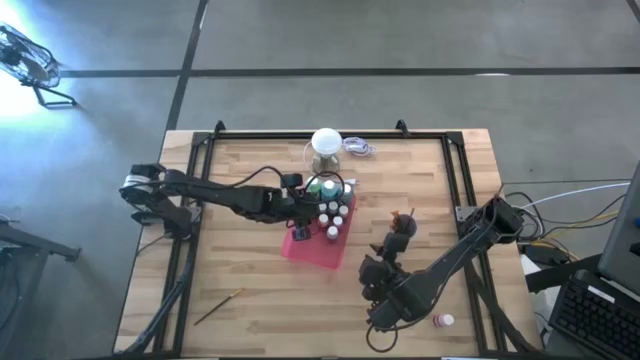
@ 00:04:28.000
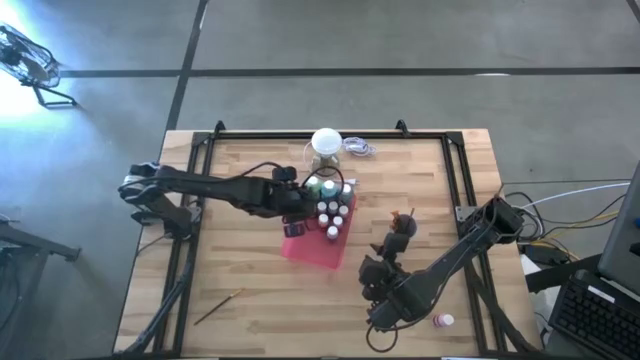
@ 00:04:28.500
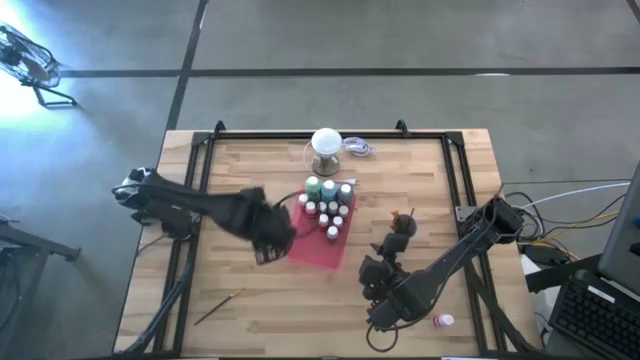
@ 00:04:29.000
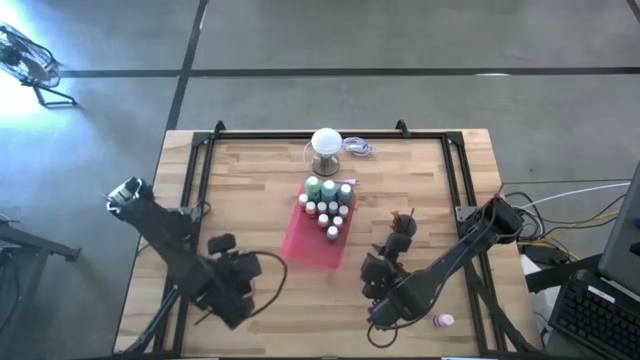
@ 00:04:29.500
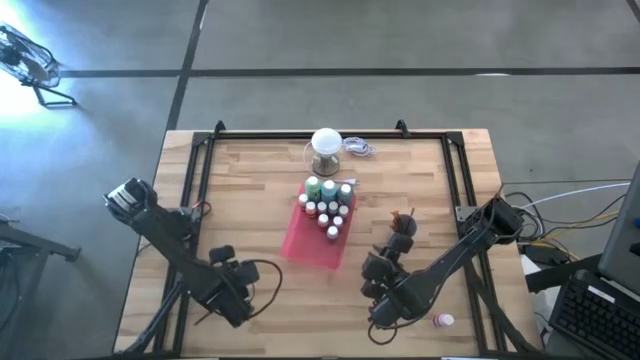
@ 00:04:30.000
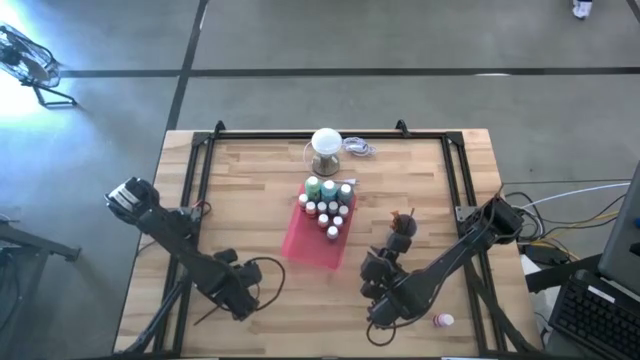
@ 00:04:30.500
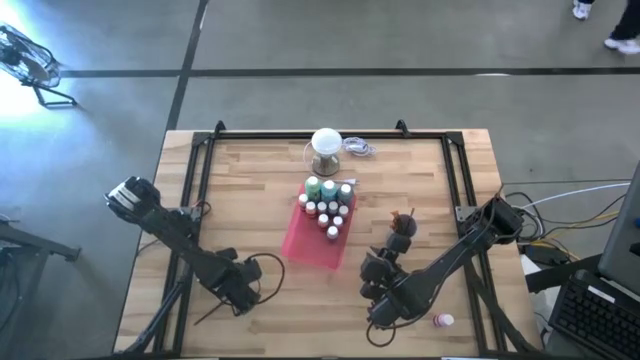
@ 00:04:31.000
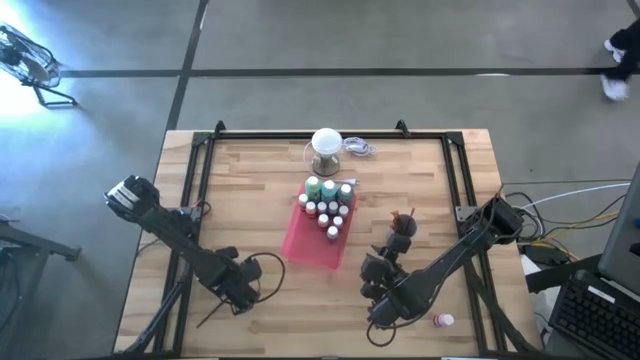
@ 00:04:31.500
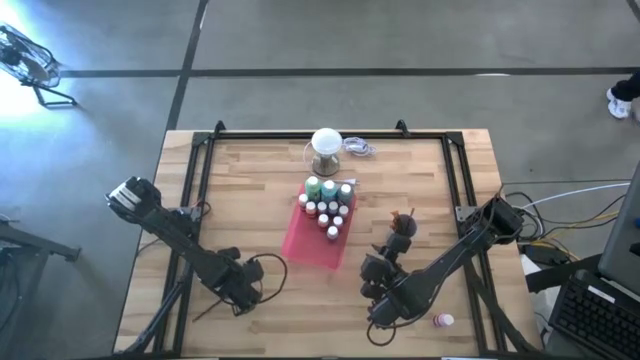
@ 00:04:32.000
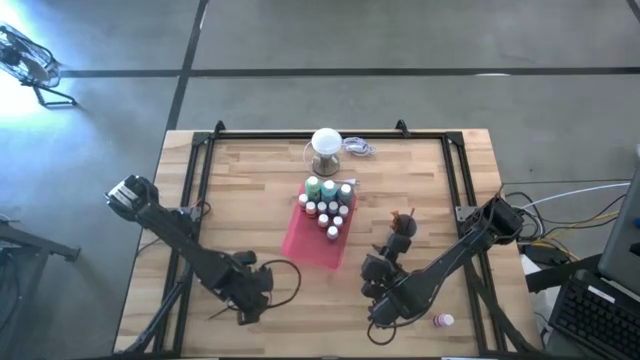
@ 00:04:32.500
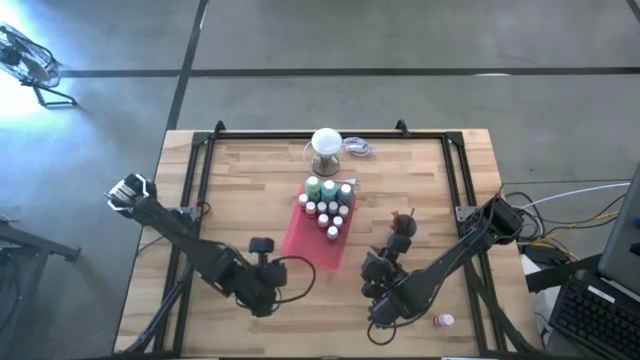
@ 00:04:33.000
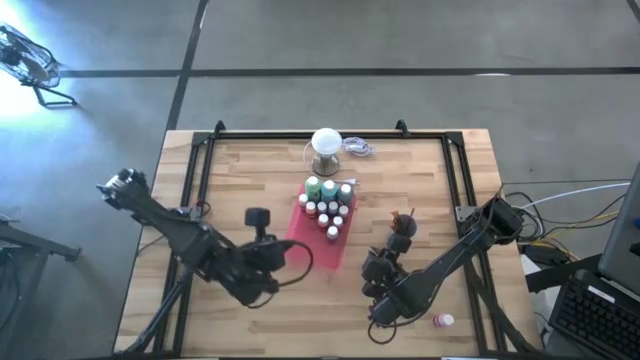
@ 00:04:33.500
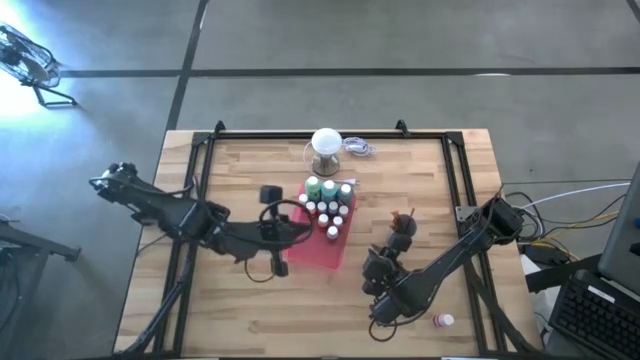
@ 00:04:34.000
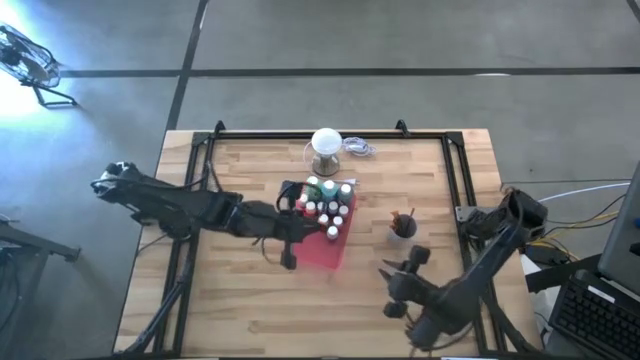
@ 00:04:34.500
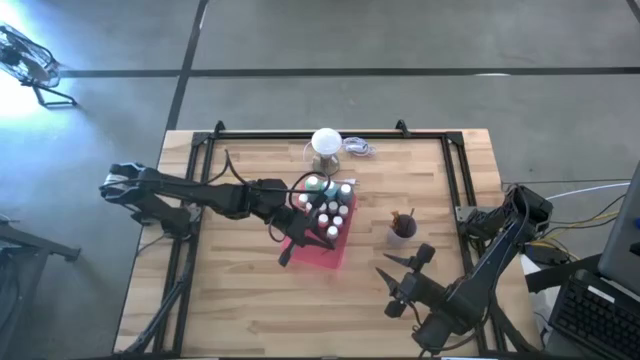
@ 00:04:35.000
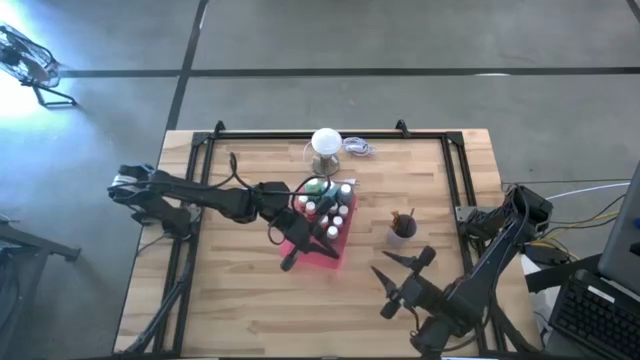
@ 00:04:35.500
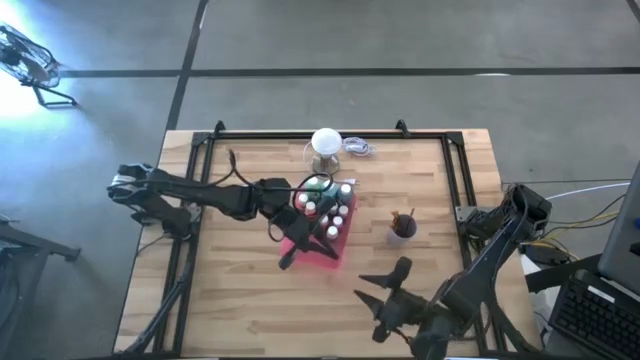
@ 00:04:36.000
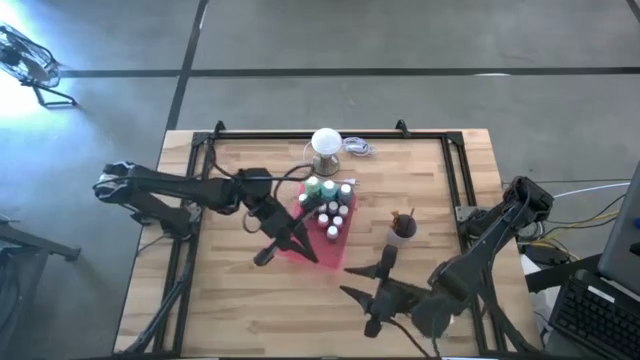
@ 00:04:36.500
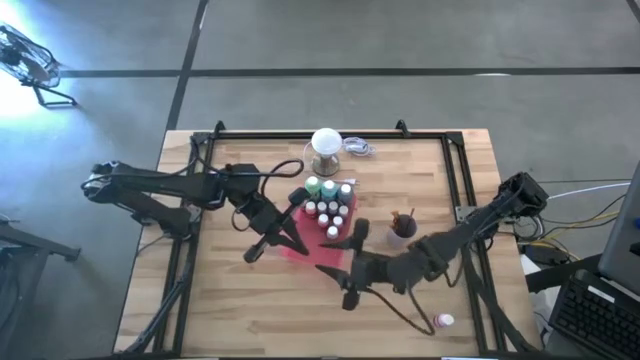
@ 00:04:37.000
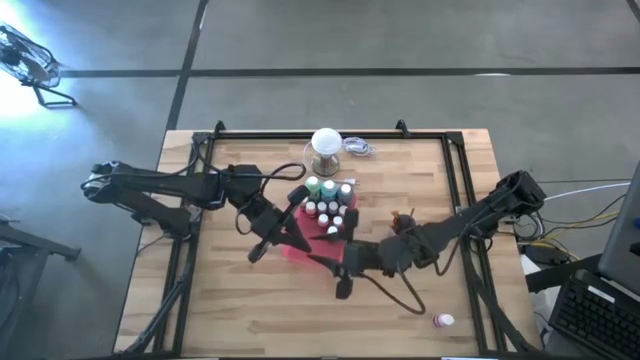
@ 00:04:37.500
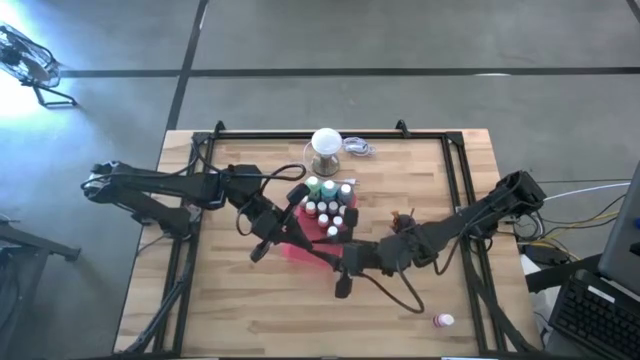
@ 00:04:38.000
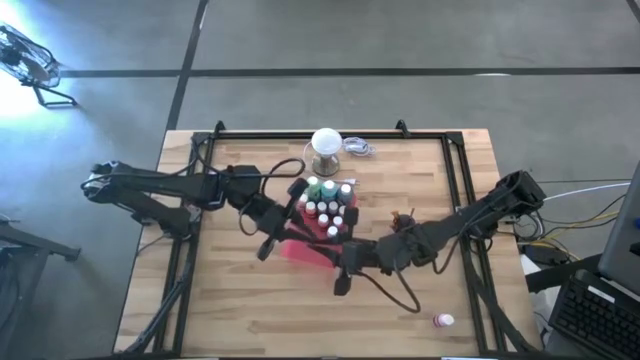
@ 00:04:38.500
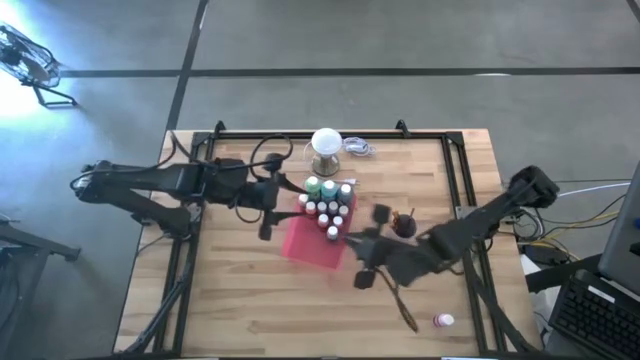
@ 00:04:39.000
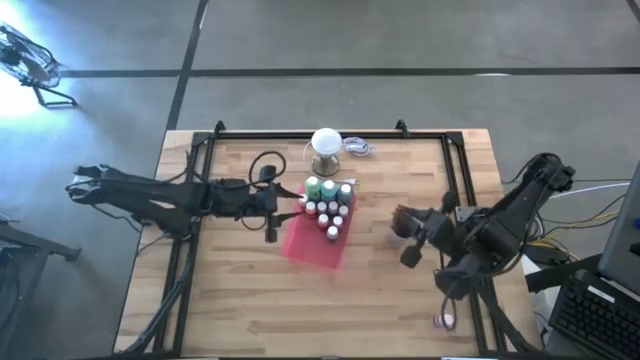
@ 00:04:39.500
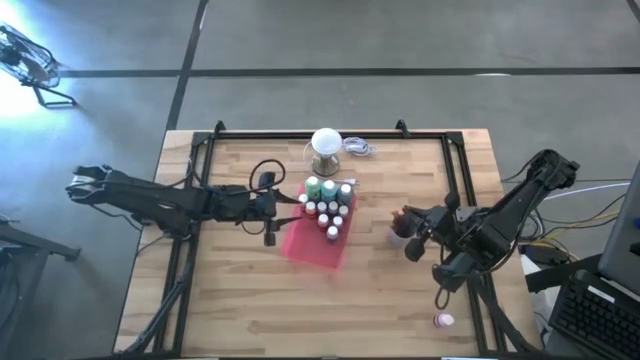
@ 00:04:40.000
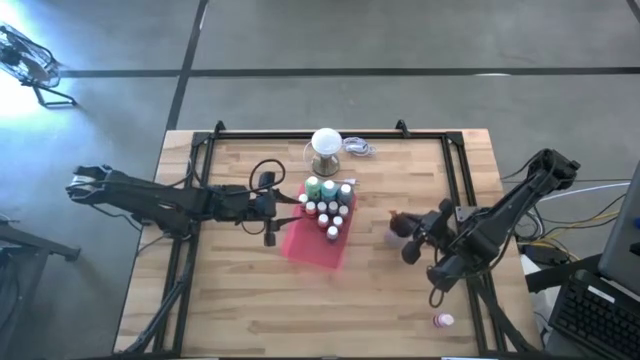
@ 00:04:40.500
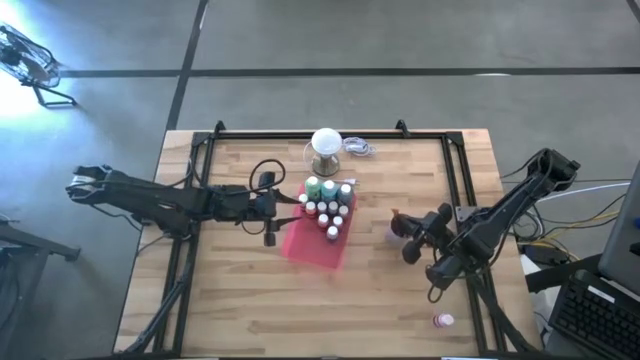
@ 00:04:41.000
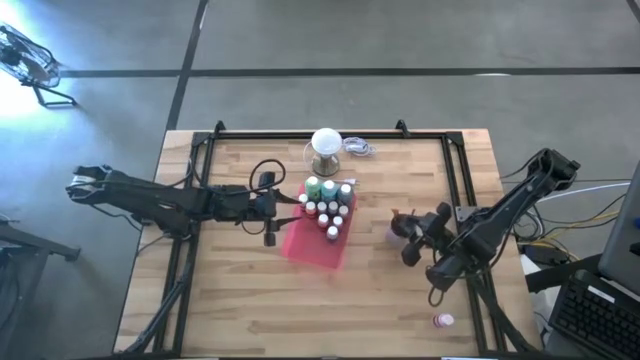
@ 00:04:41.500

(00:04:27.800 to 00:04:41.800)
Task: Pick & Place Paint Supplies
Put the orange paintbrush into the purple cup

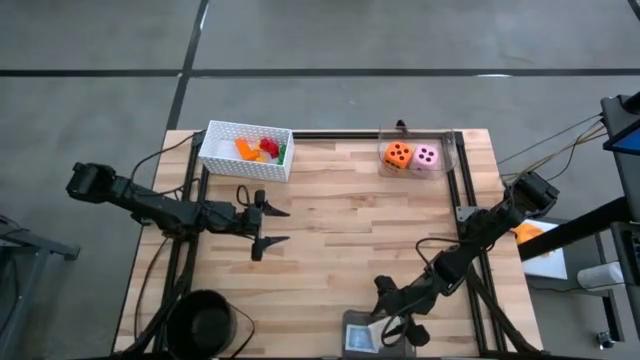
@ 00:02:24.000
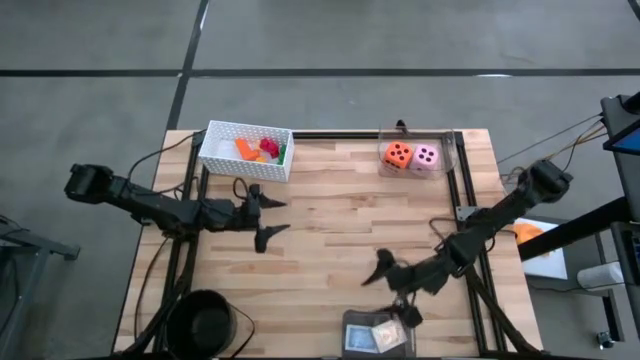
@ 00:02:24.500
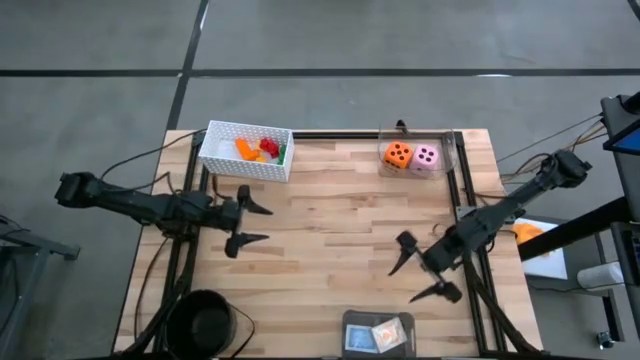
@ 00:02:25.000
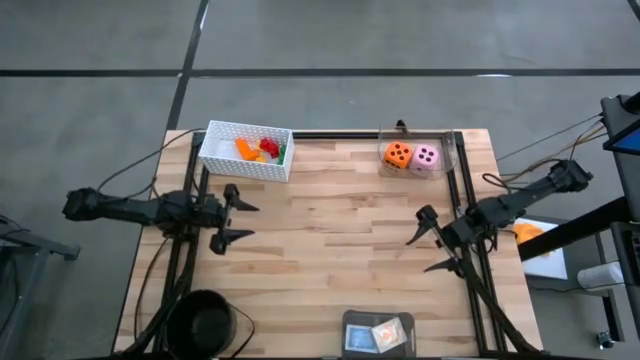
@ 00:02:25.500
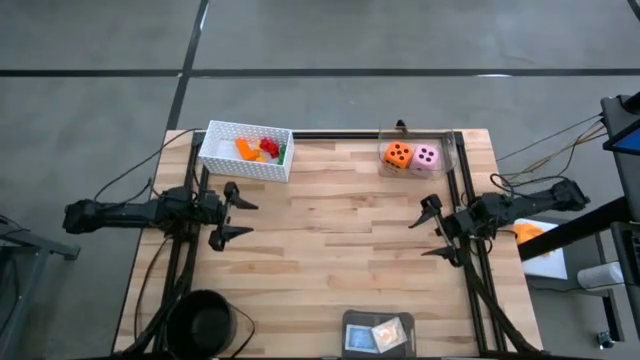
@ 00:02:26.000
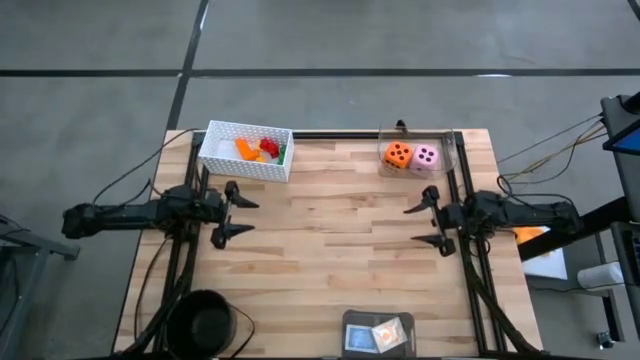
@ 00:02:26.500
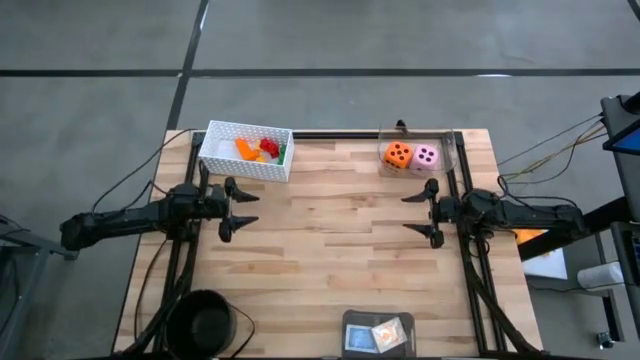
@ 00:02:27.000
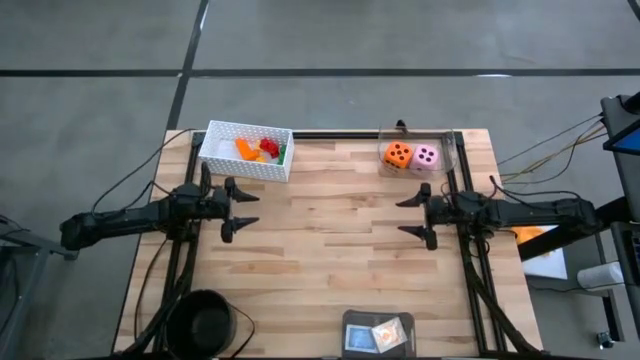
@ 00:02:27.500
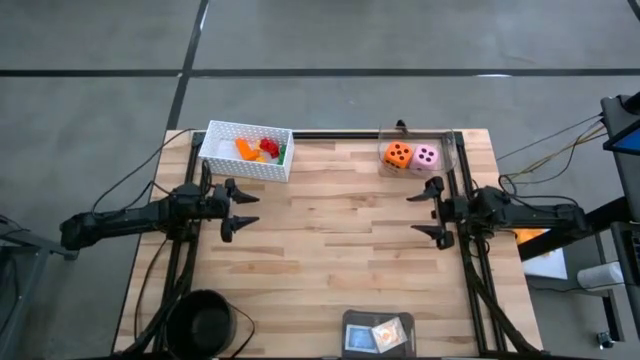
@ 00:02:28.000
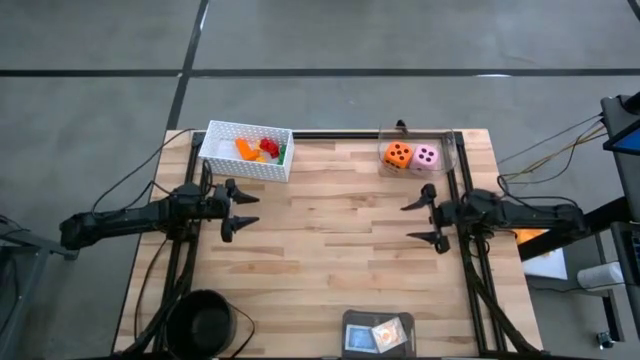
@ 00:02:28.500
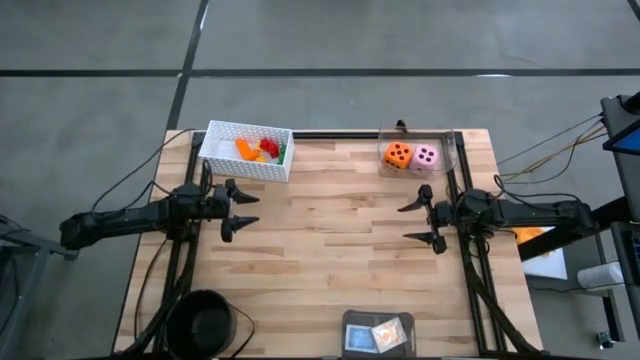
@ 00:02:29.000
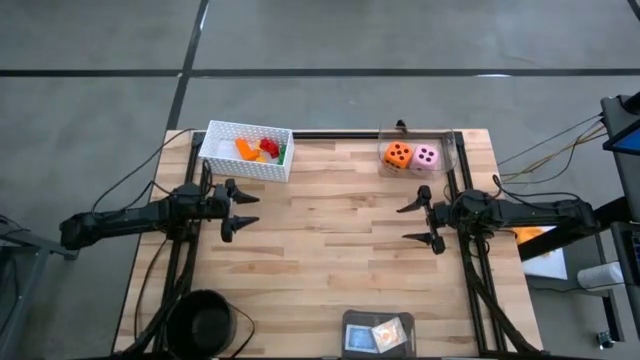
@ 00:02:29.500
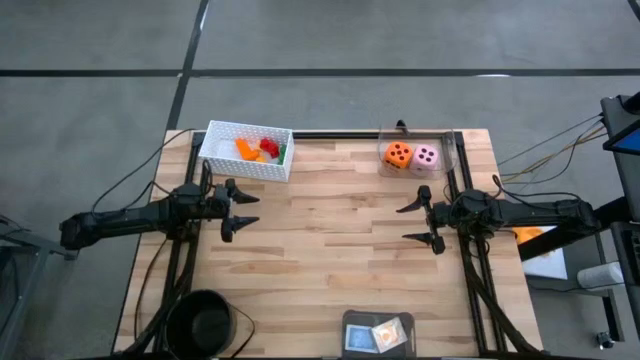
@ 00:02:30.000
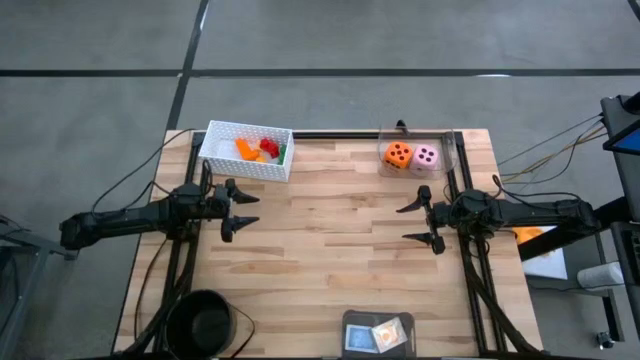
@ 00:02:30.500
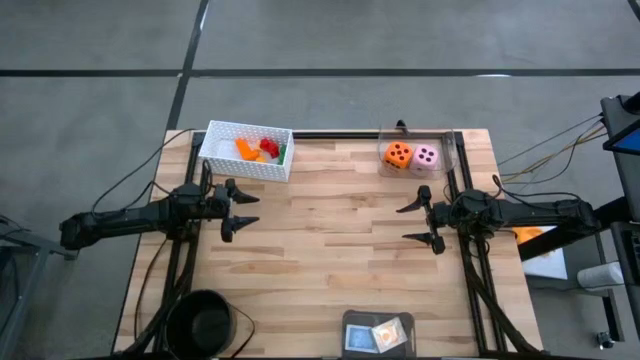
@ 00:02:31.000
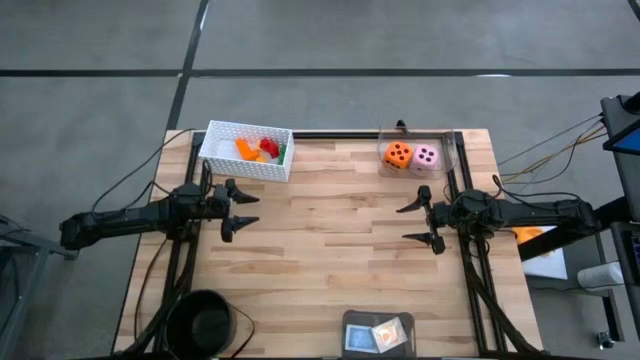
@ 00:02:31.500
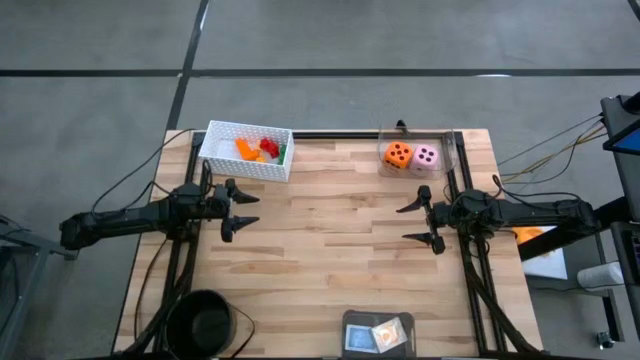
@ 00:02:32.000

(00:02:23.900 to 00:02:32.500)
Task: Pick & Place Toys
Return to Home Position
